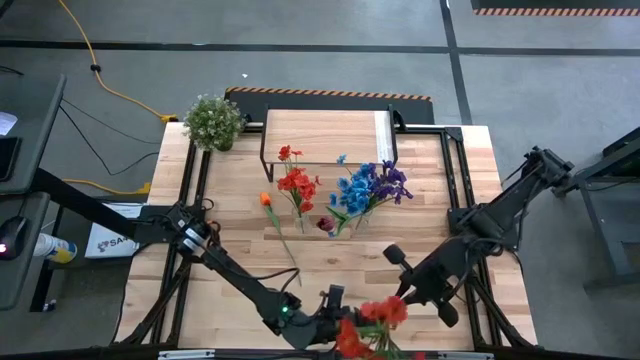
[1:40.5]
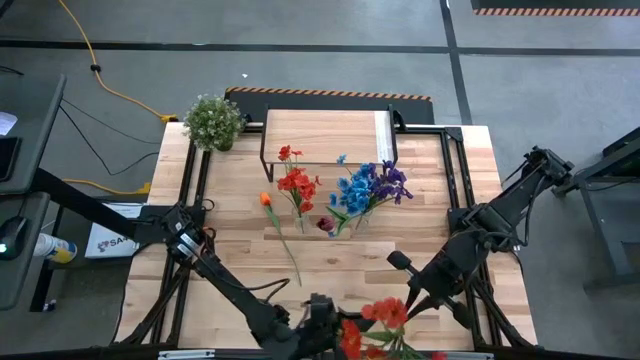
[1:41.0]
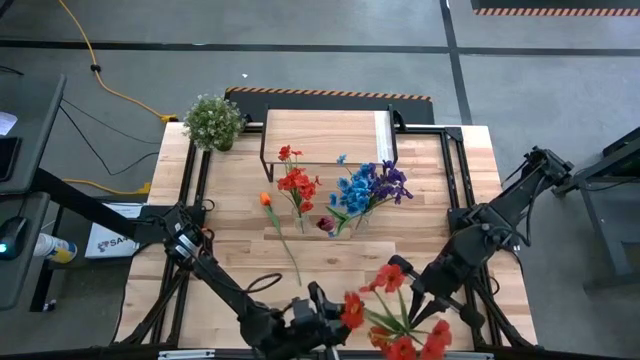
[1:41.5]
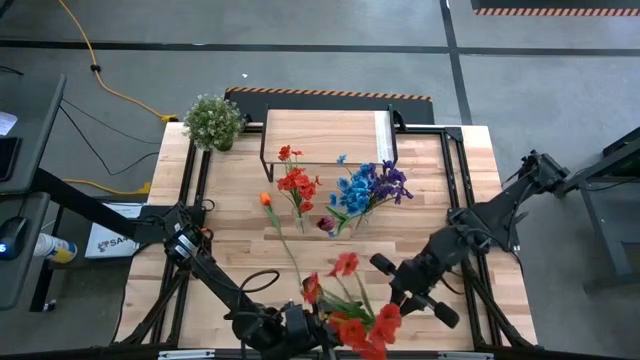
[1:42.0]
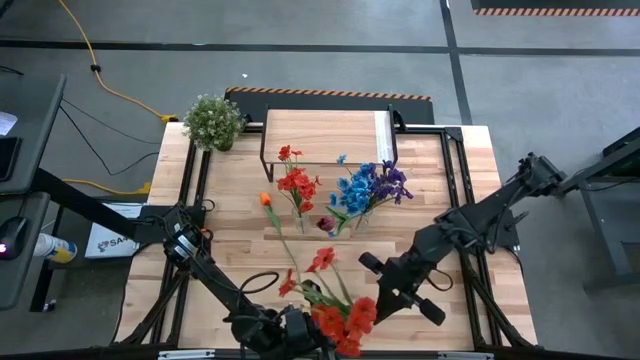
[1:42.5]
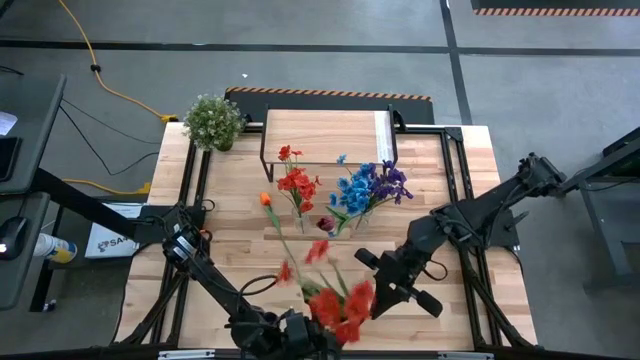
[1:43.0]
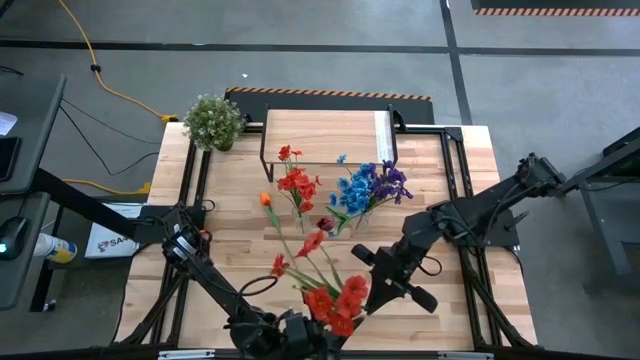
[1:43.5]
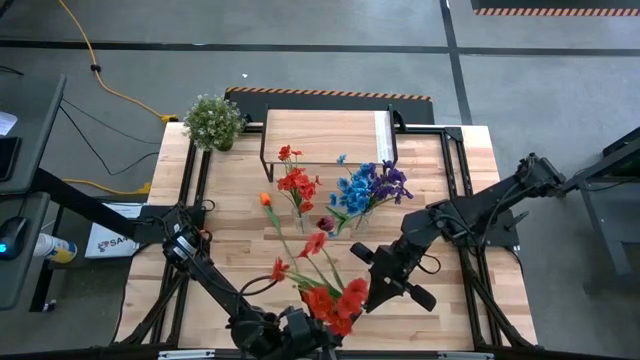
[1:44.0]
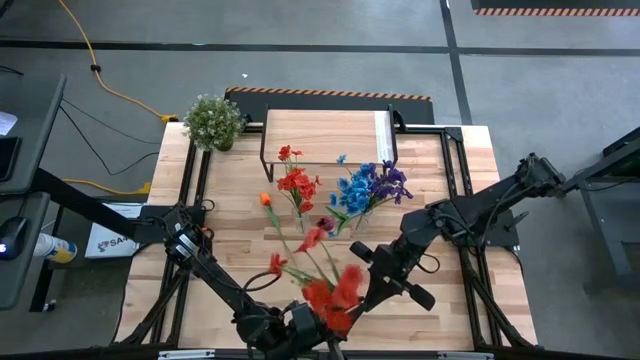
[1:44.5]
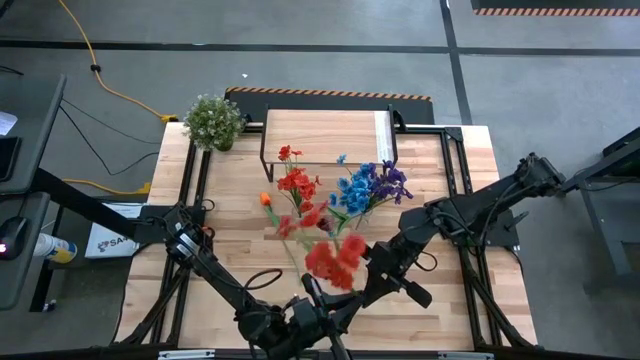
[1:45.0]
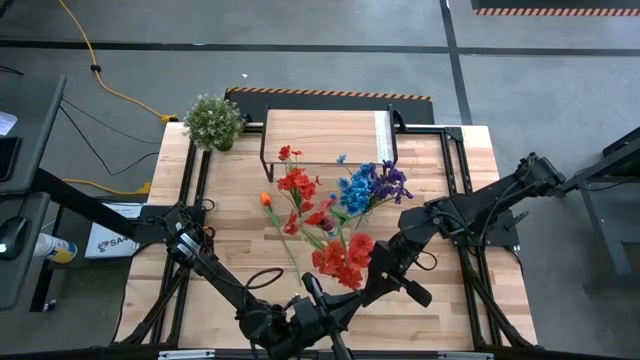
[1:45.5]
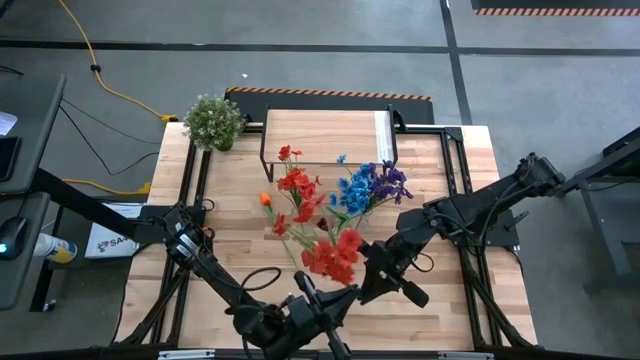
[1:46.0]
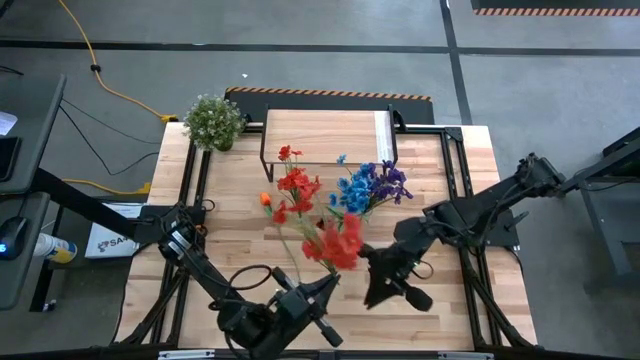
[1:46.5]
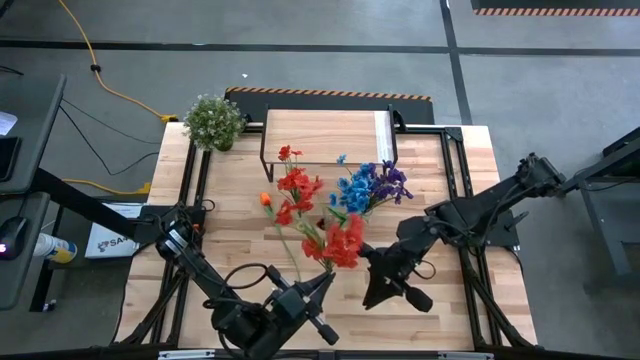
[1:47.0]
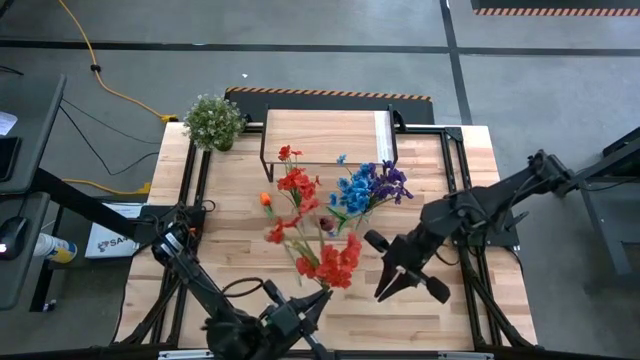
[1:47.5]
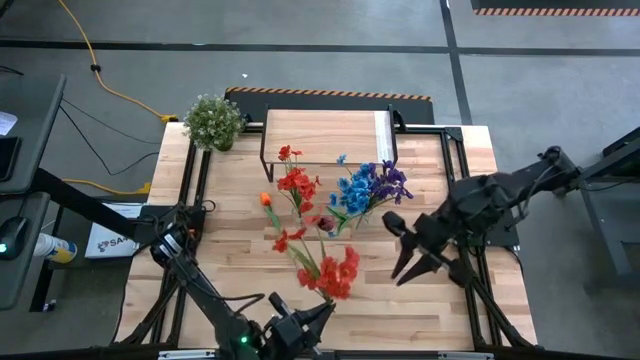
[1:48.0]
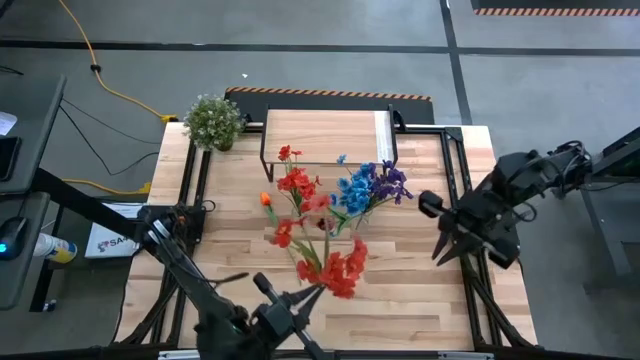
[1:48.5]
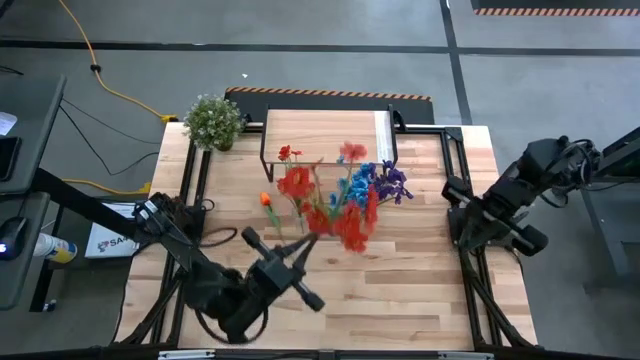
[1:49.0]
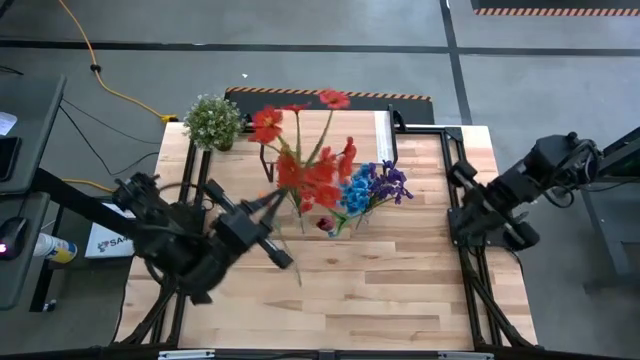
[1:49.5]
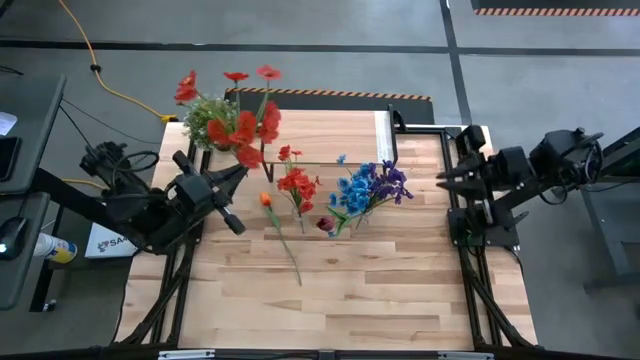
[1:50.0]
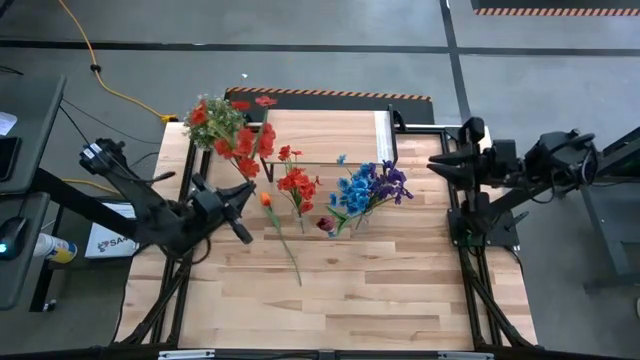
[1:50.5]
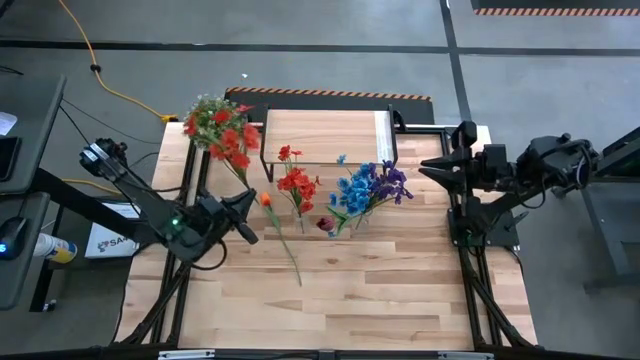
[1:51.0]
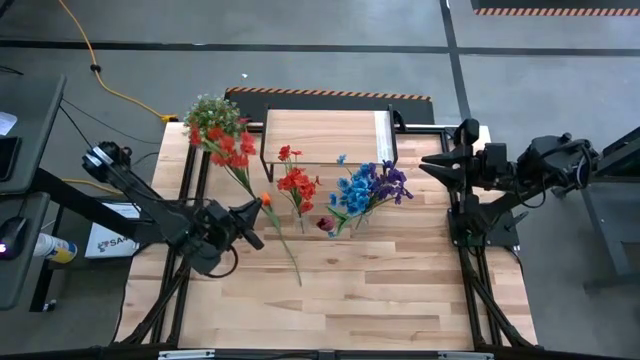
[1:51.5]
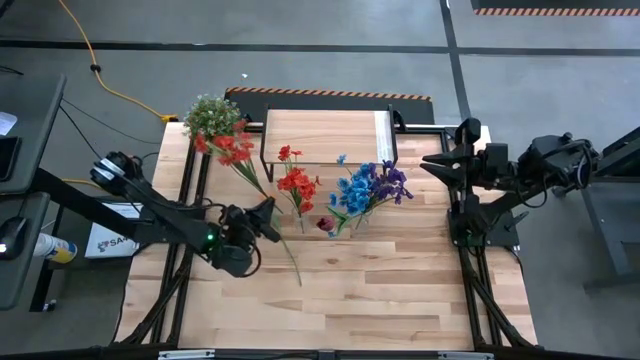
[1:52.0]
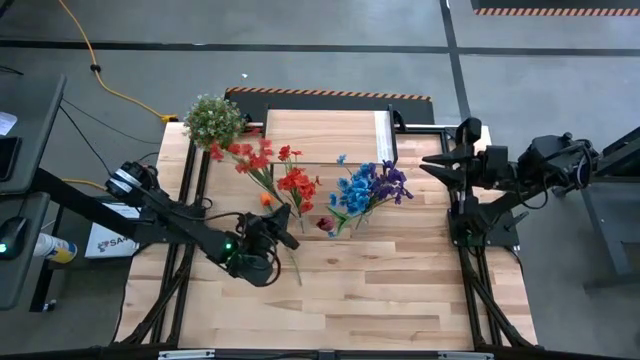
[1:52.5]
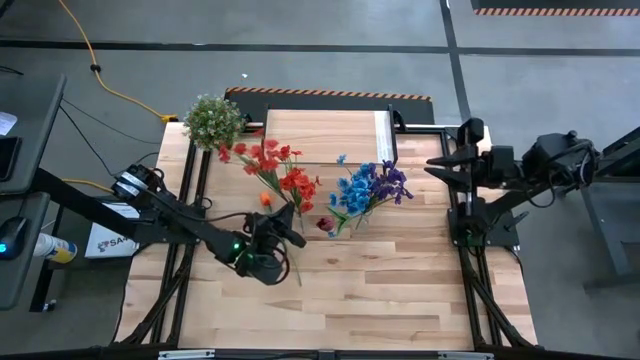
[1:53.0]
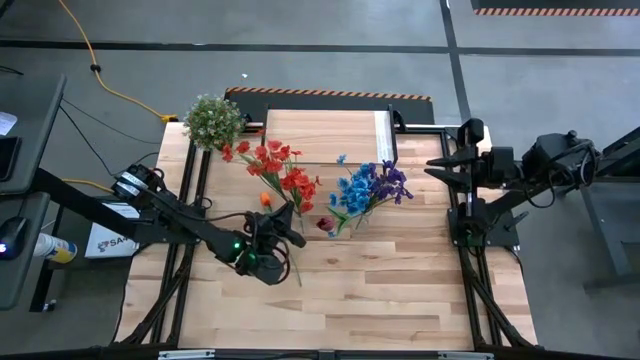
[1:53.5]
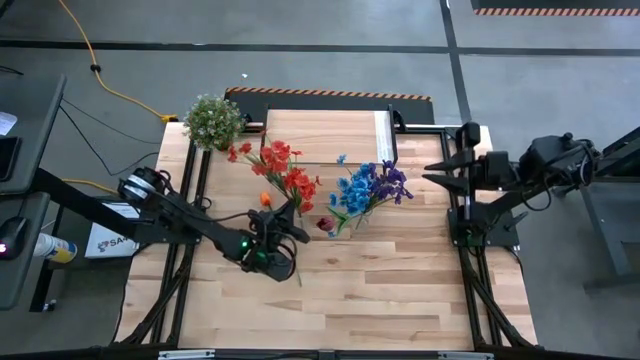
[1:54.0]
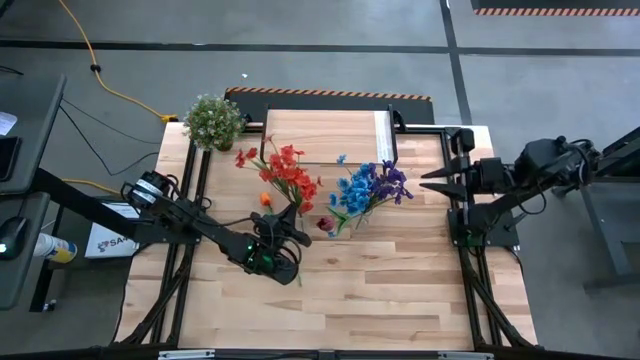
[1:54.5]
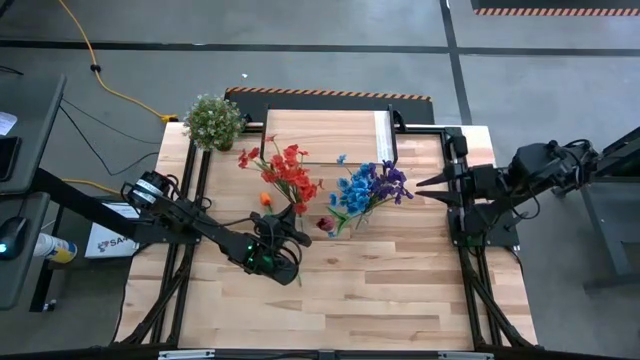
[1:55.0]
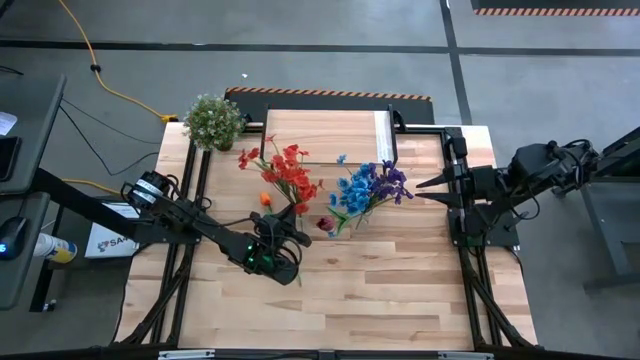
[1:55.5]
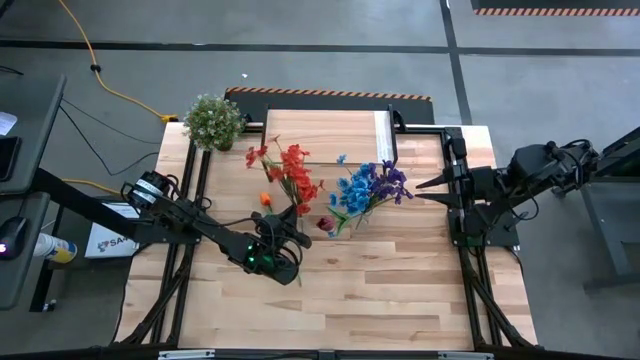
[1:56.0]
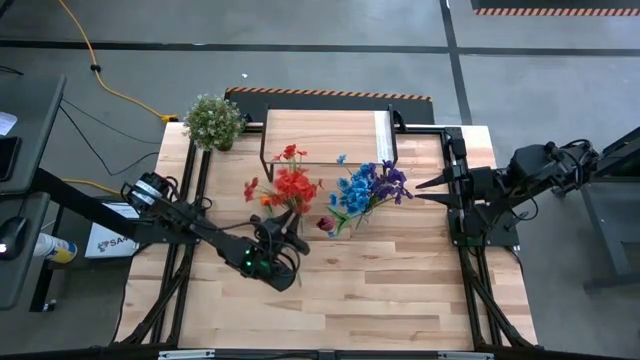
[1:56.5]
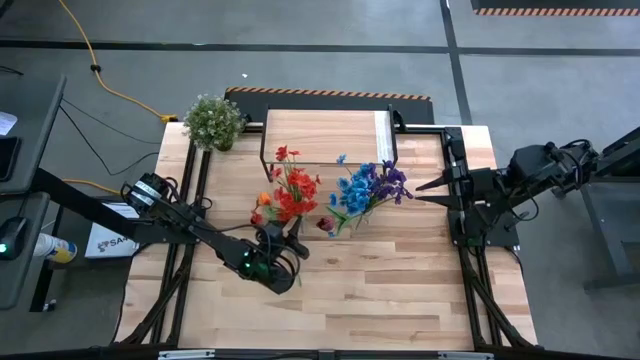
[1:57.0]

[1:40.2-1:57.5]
Task: Pick and place flowers into a vace then onto a shelf
Put the red flowers into the left transparent vase

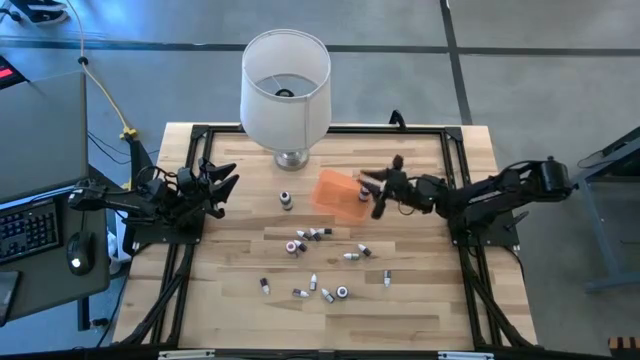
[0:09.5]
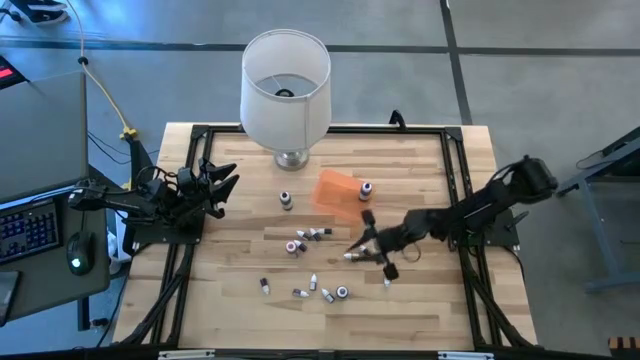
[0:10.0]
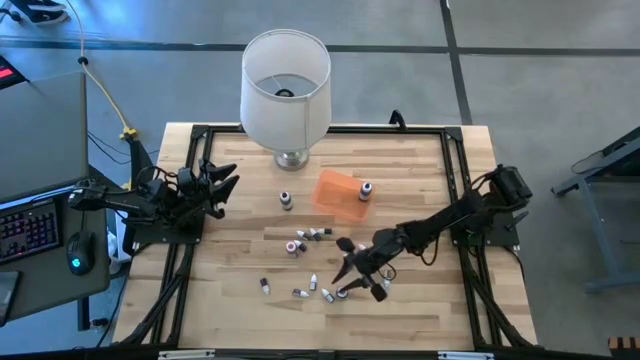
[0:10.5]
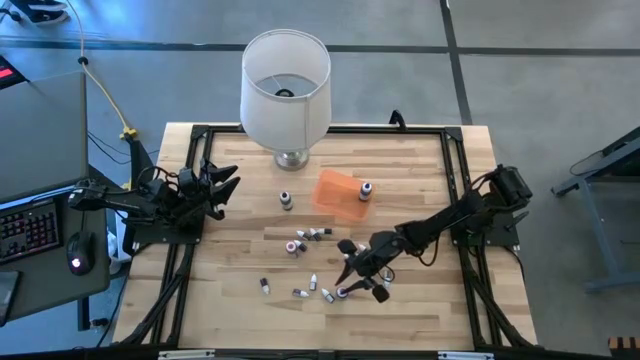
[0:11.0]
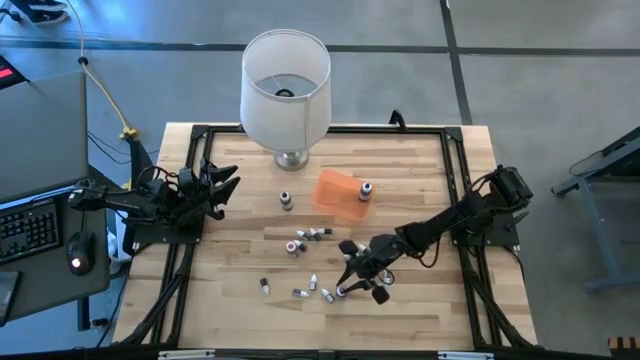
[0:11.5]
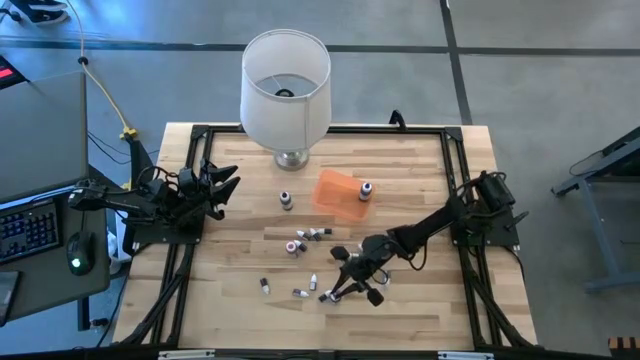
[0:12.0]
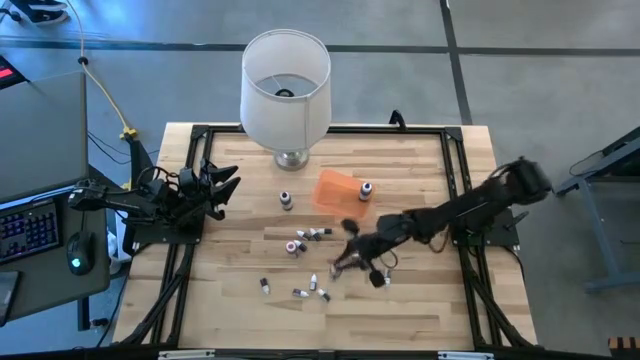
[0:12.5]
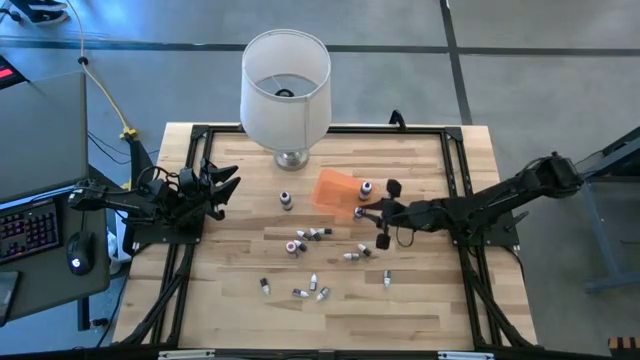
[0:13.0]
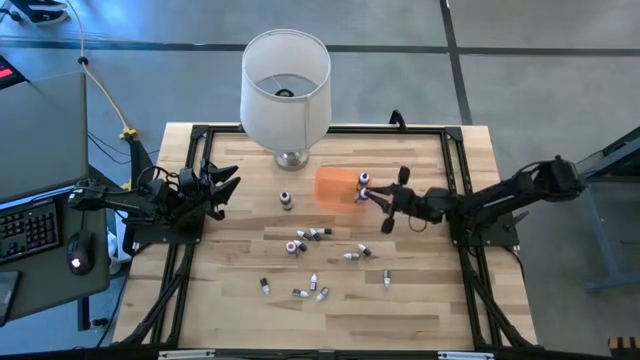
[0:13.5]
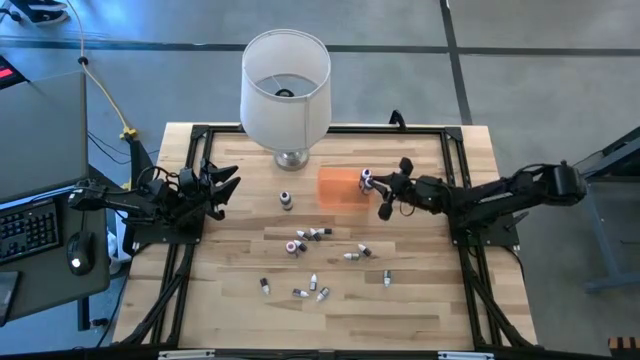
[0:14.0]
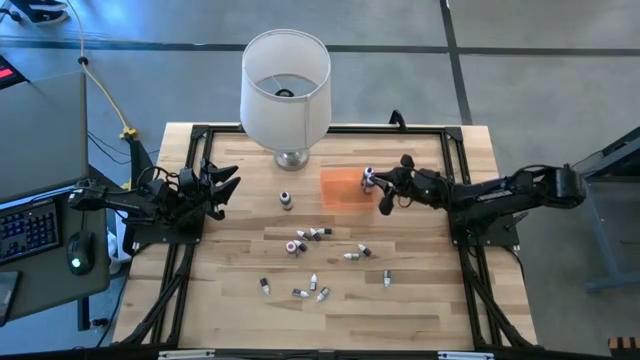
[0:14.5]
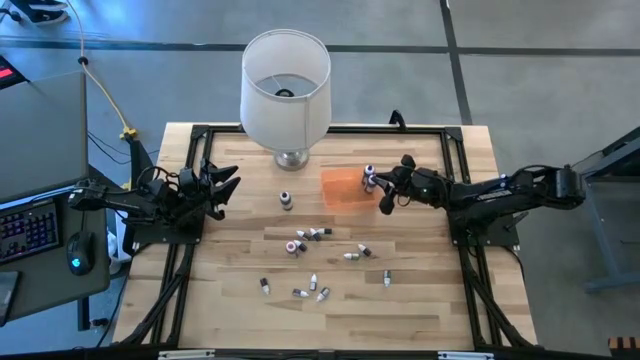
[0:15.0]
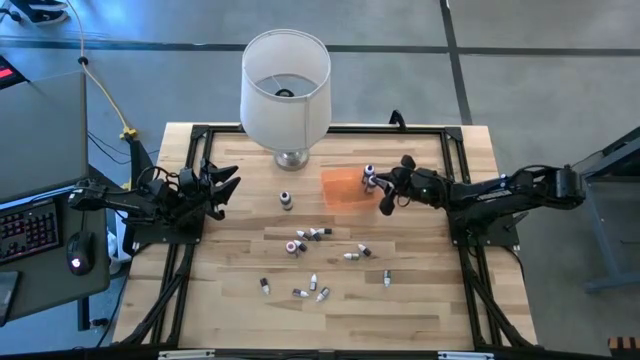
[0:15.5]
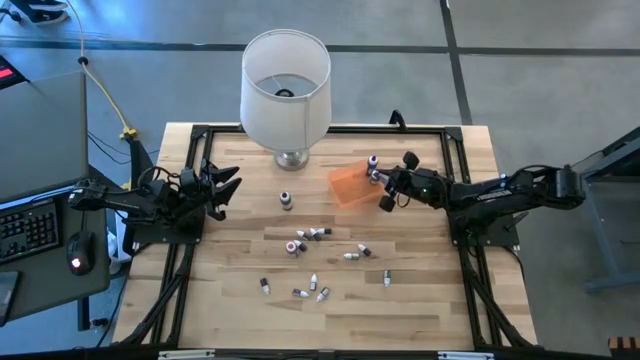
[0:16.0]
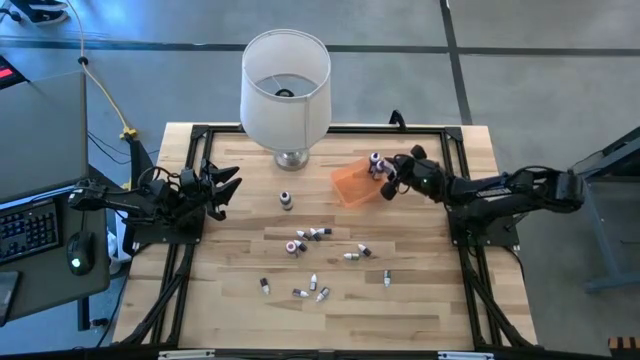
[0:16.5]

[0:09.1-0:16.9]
Task: Pick & Place food coloring
Put the large purple food coloring bottle into the orange bin
